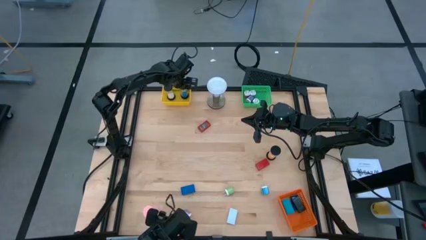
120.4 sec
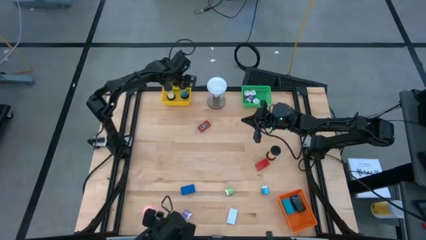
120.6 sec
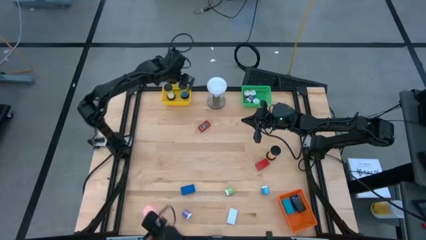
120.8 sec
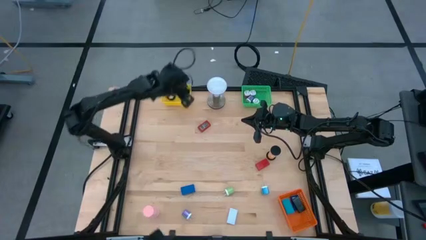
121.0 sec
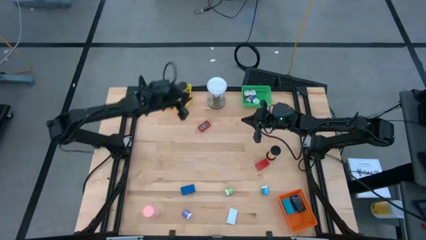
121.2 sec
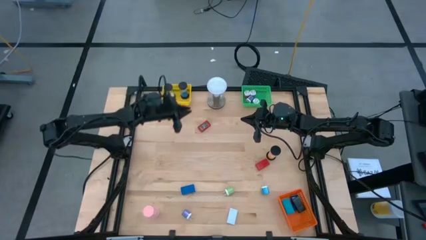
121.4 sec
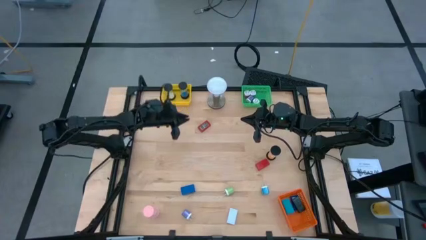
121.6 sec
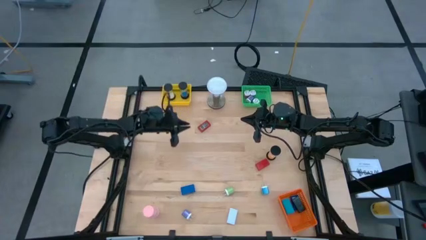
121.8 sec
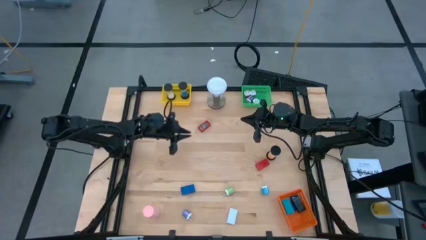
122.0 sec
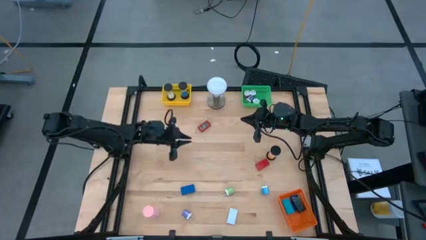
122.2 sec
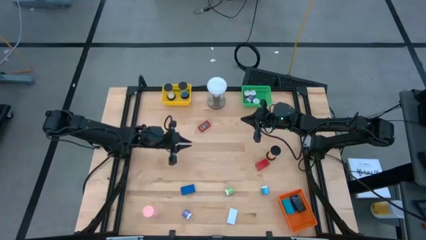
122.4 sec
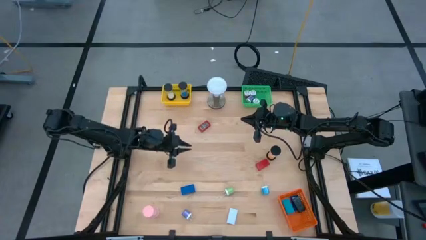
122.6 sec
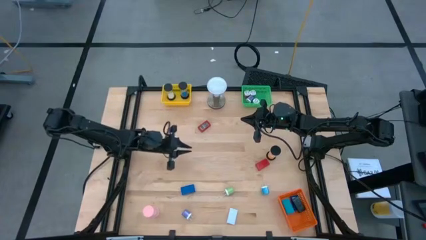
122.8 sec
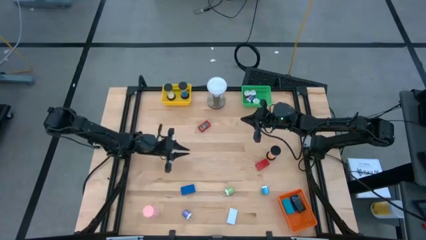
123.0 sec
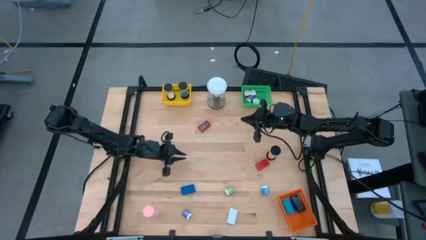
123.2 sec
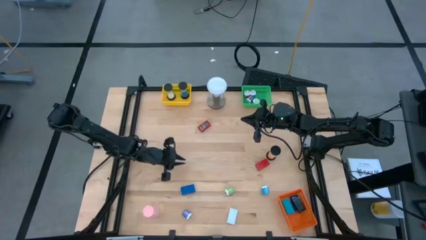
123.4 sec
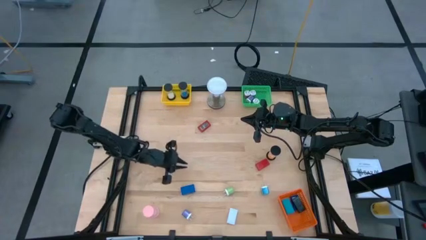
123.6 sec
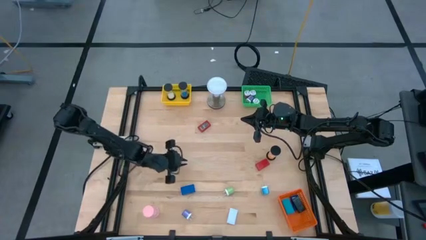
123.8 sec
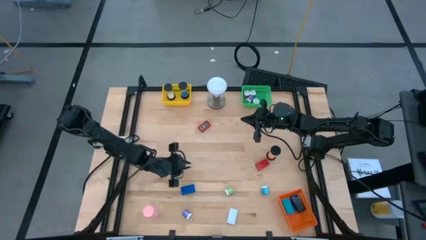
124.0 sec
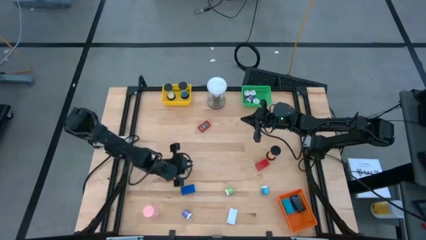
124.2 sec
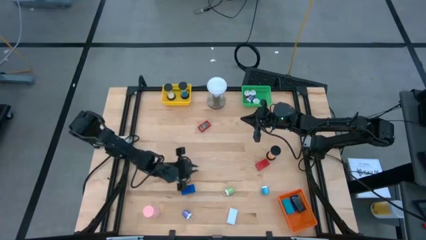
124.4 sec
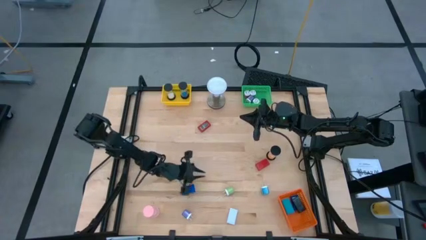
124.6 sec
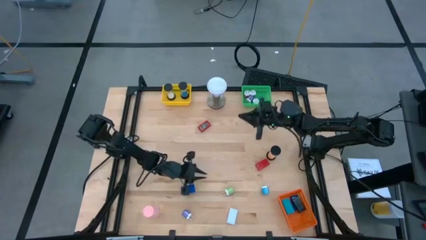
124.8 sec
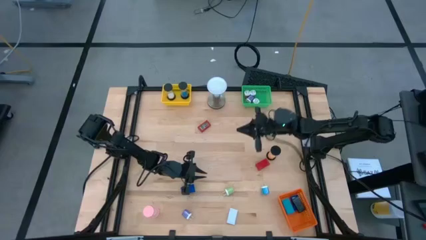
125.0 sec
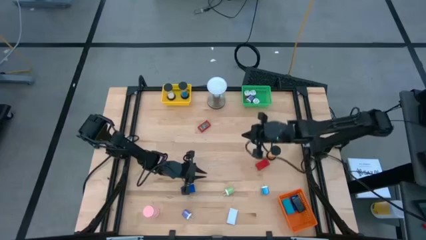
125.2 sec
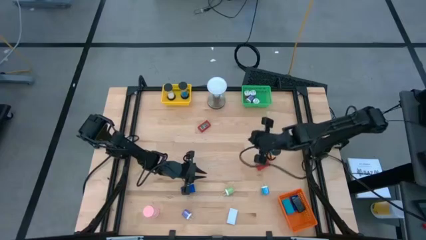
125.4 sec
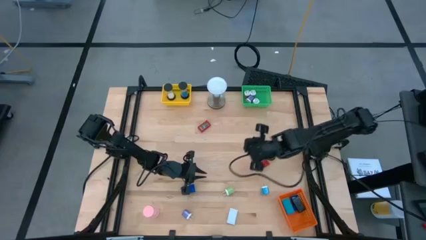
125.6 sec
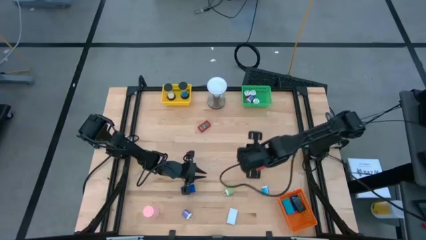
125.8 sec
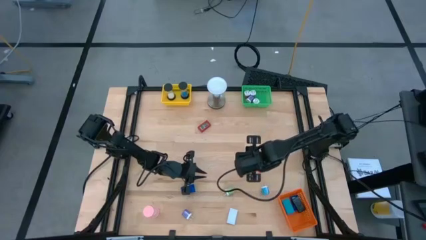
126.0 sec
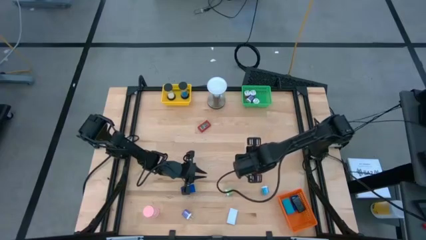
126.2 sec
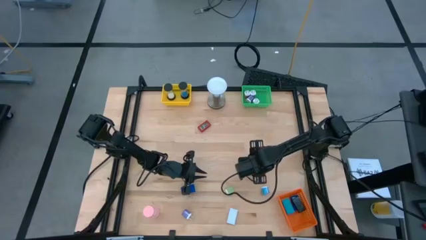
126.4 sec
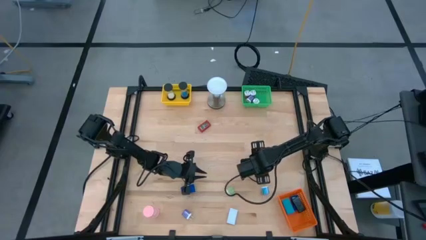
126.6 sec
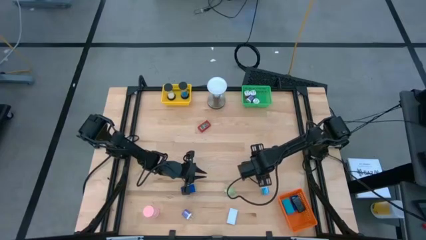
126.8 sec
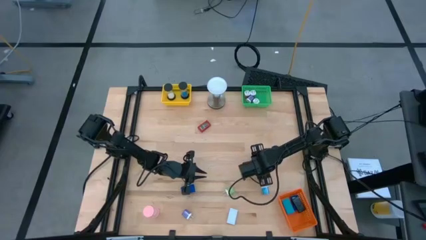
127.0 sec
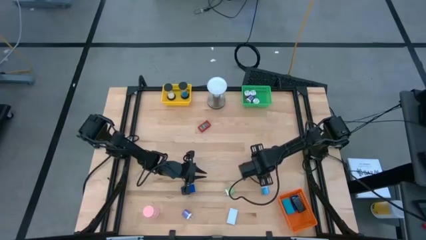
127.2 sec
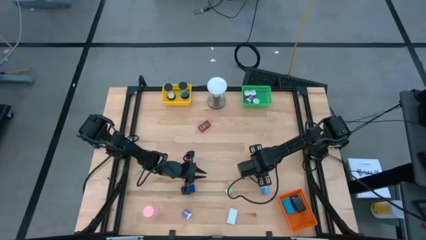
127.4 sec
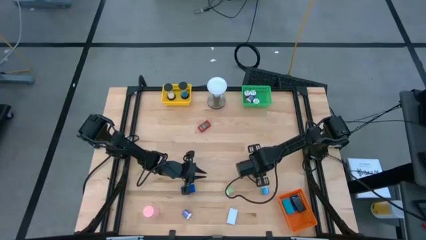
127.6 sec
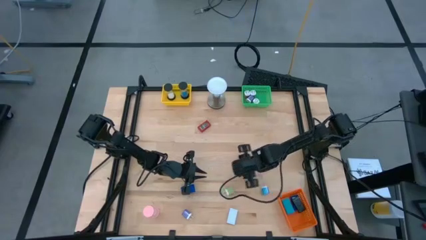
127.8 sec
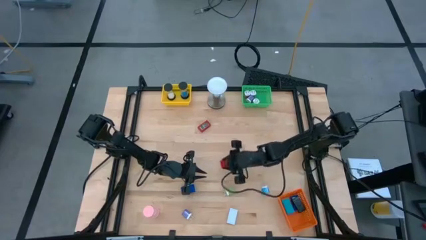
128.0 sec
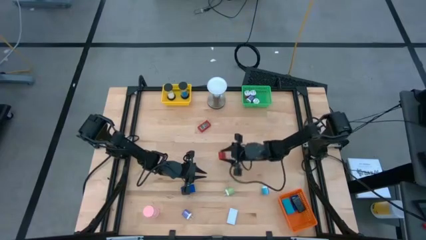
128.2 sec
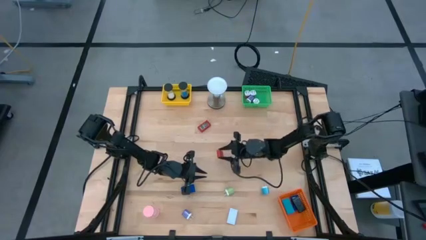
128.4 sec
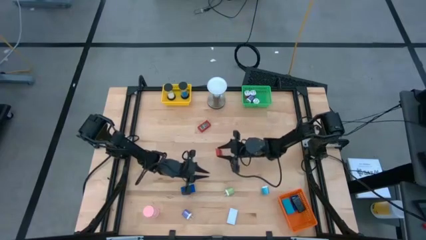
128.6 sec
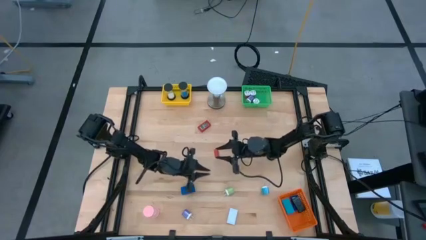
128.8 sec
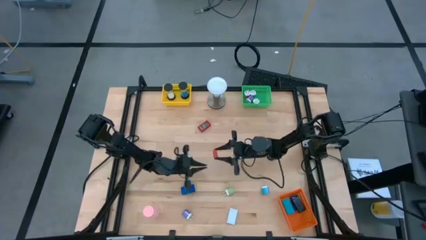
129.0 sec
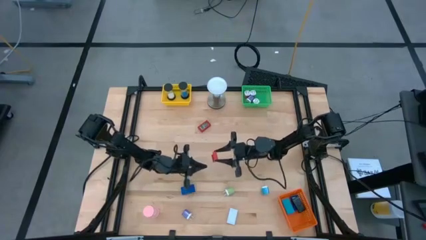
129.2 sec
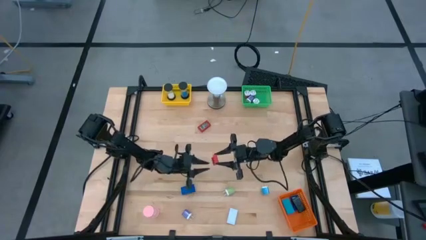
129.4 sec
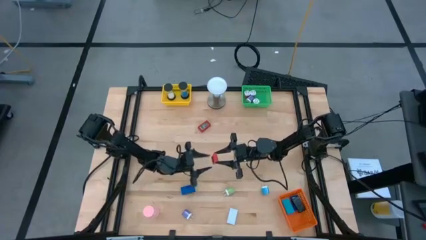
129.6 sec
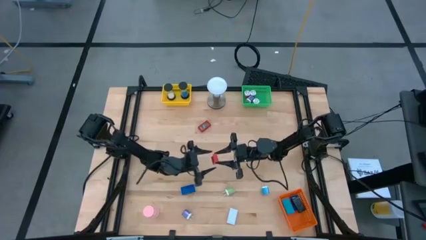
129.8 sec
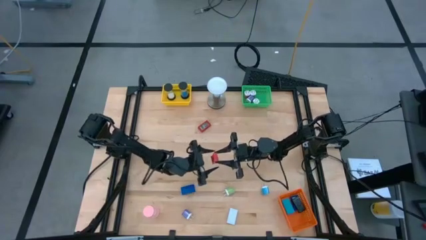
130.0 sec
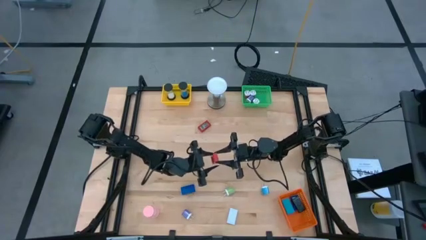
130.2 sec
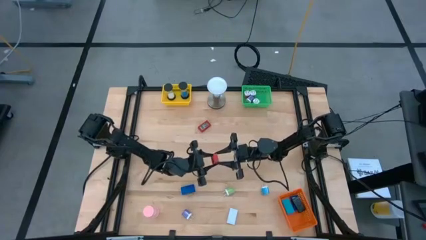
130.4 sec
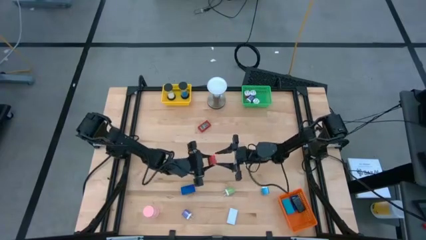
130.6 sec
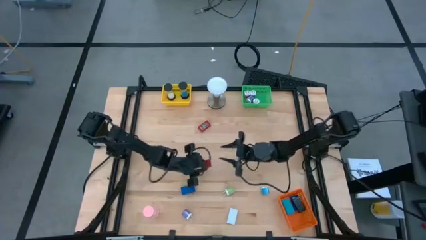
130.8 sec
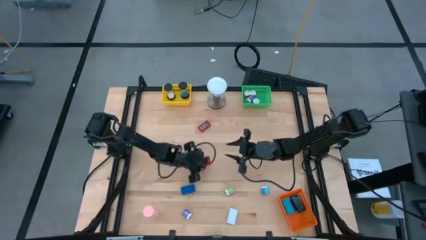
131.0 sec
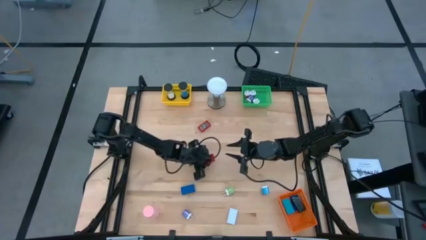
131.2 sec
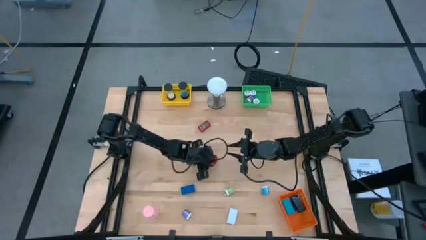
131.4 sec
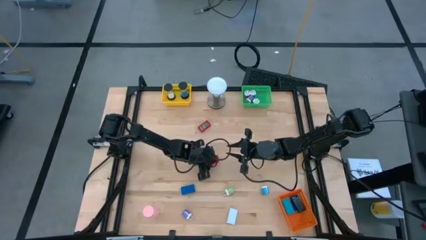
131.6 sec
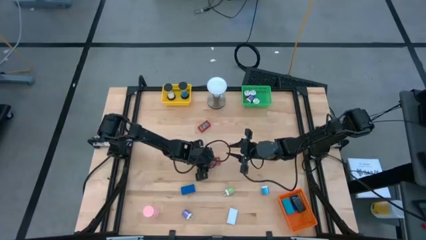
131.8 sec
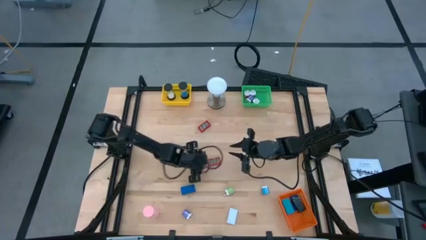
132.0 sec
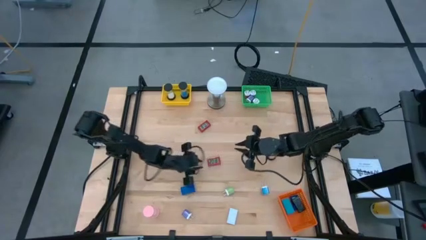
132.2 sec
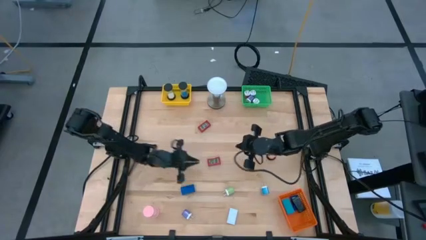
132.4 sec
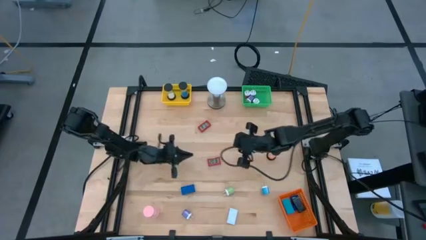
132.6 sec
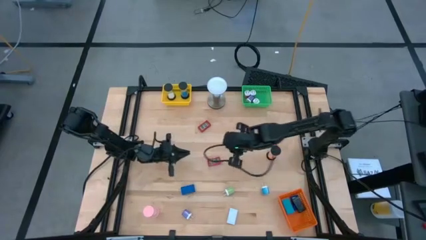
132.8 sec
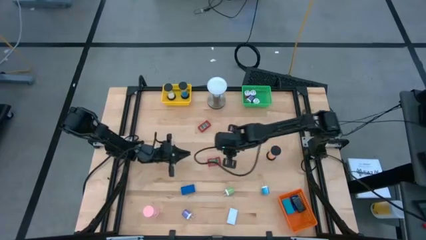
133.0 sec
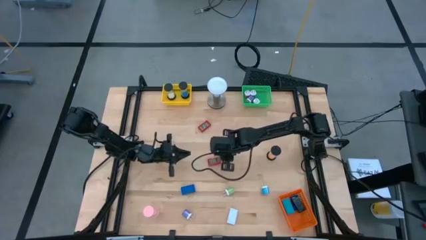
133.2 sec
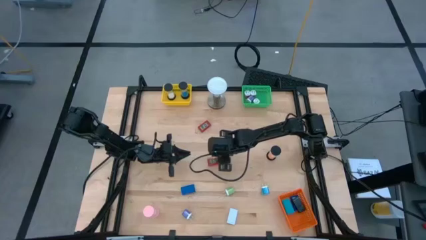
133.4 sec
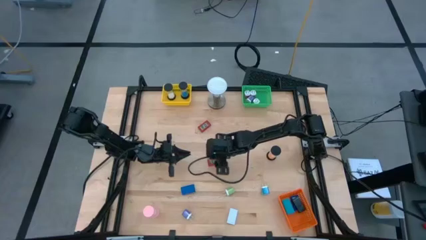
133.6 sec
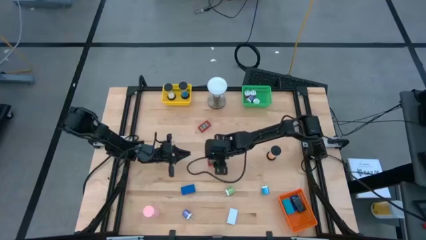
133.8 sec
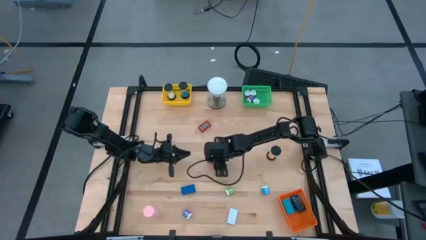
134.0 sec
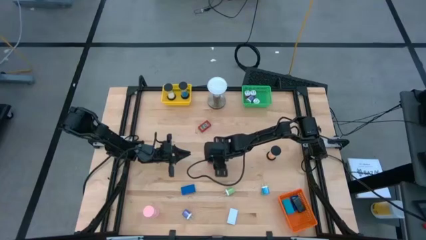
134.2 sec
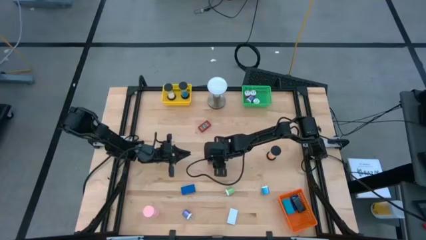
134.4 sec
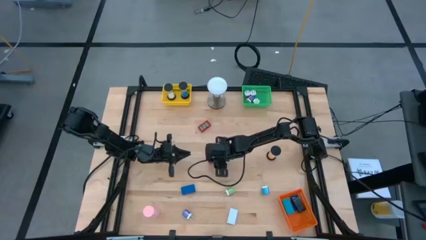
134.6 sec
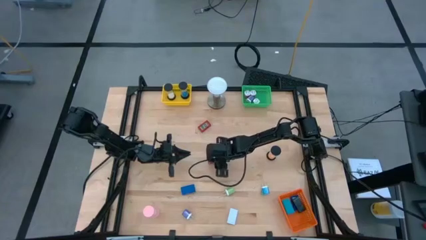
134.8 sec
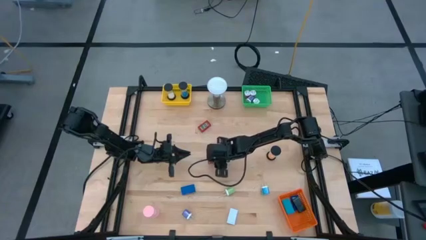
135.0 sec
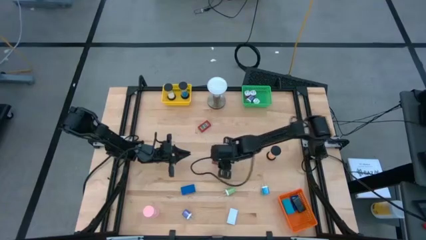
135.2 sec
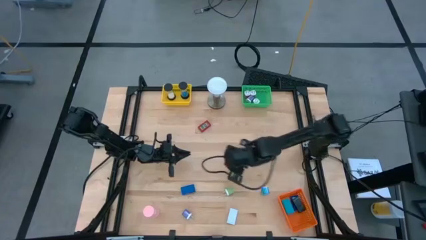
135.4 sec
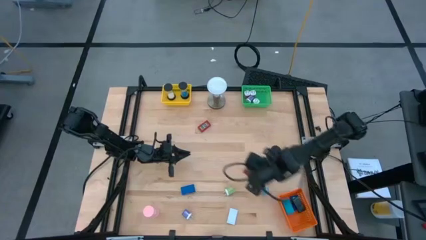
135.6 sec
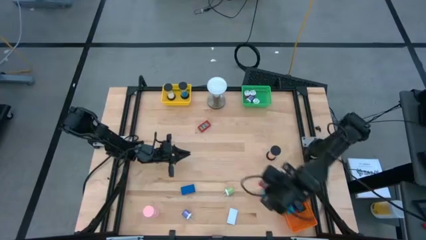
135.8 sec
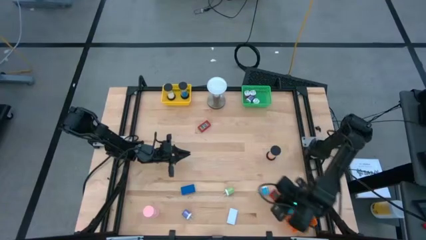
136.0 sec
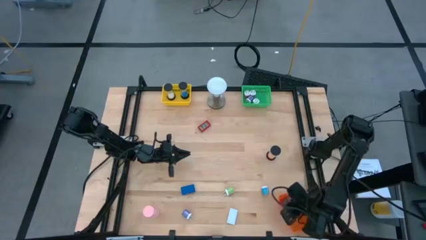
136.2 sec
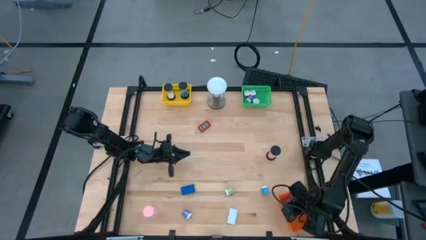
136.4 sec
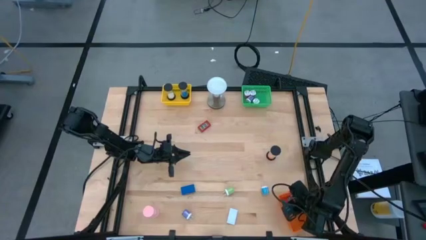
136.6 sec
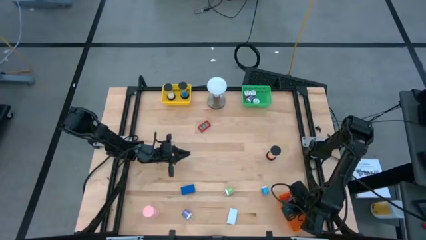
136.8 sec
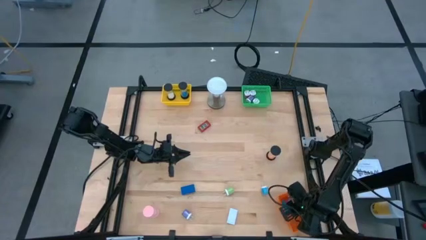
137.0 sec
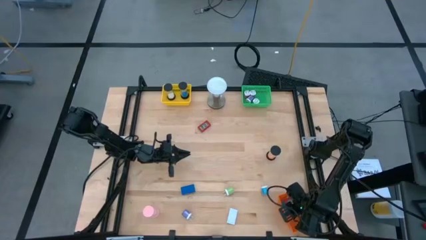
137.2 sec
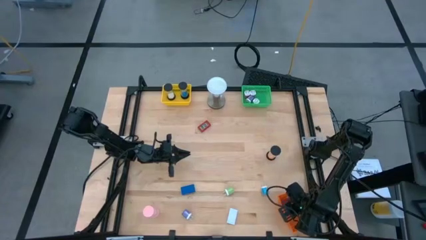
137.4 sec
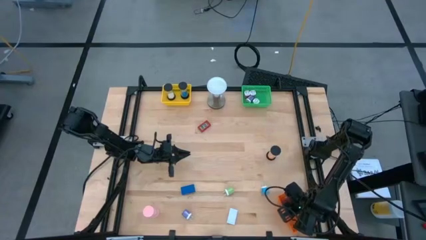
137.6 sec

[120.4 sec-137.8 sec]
Task: Pick & Place Office items
Put the bottom red digital timer into the orange bin
